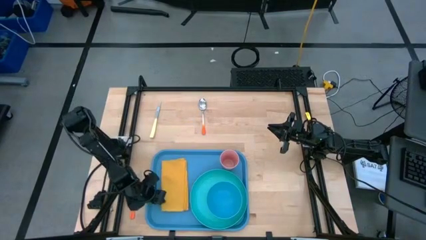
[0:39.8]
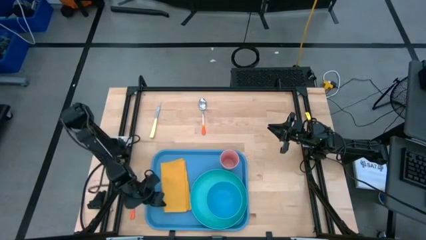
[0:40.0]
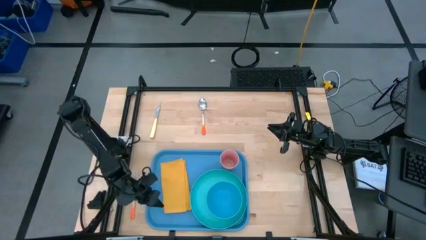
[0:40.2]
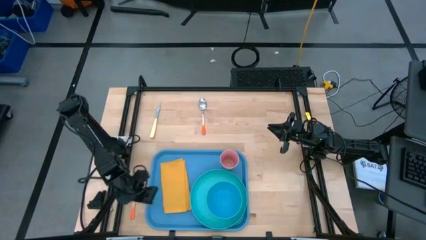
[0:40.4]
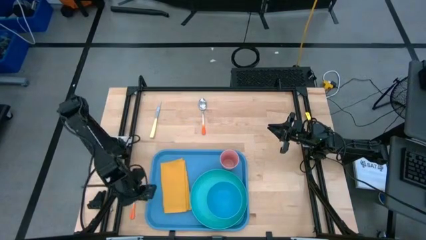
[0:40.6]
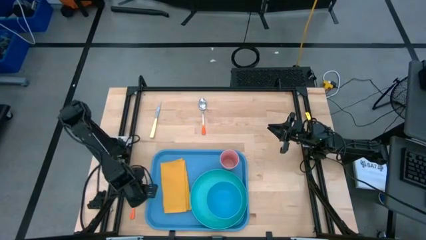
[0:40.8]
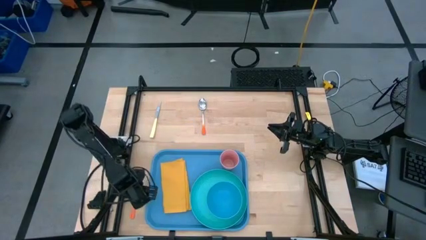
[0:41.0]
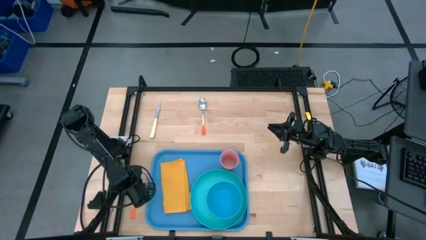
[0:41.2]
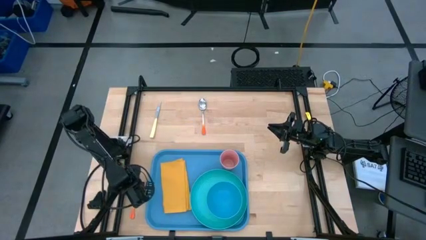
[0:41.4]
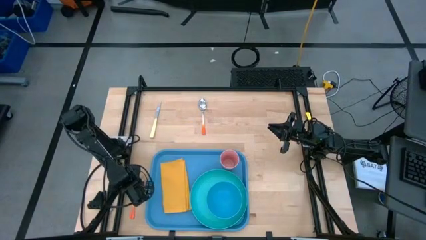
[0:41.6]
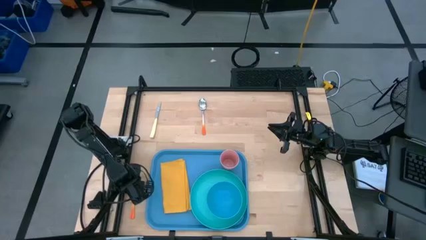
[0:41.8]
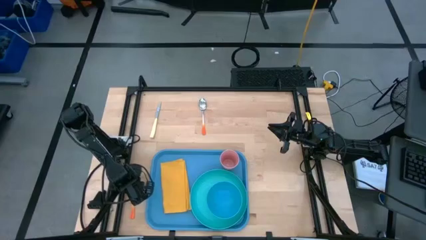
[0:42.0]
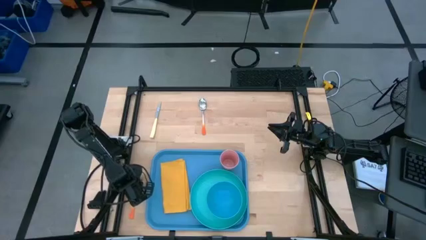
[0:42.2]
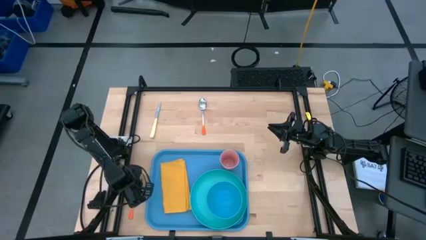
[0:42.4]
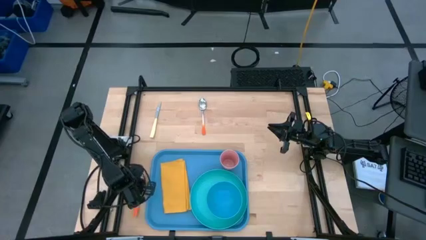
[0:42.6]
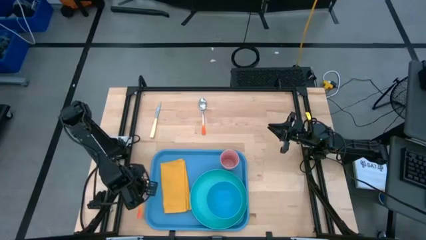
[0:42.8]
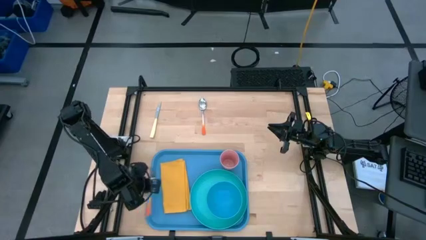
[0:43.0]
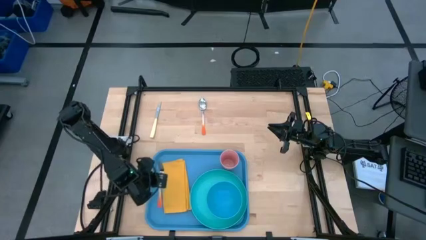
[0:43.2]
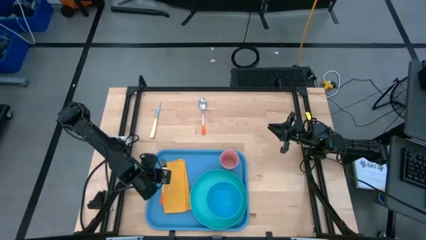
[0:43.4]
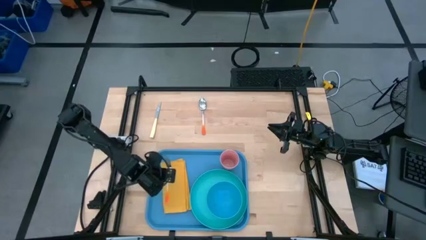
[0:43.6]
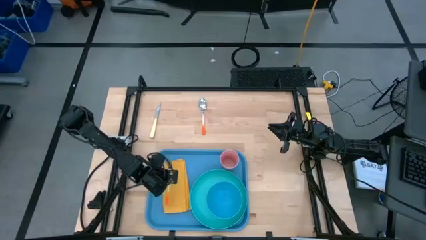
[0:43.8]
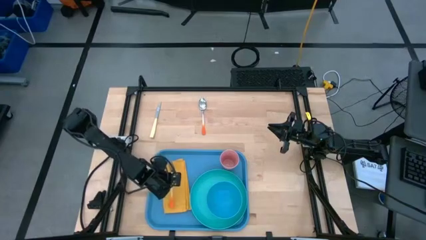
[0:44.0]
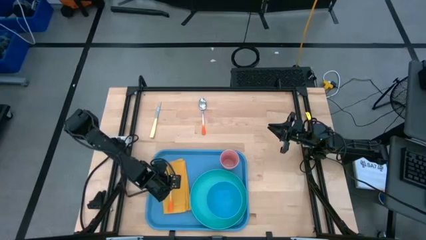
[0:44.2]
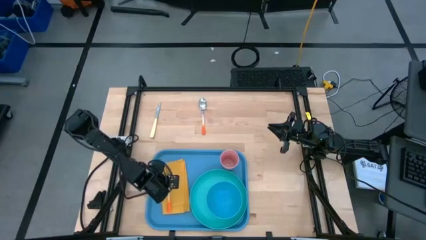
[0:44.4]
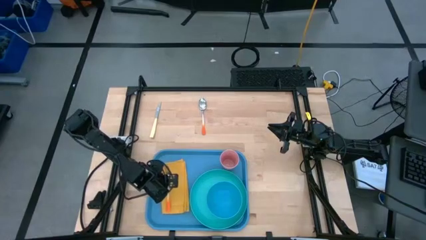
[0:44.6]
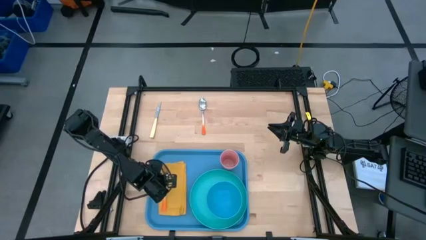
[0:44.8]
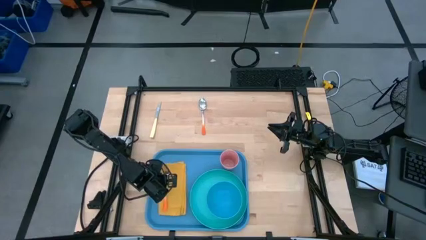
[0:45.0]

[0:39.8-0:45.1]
Task: Set up tray
Put the orange fork on the yellow napkin

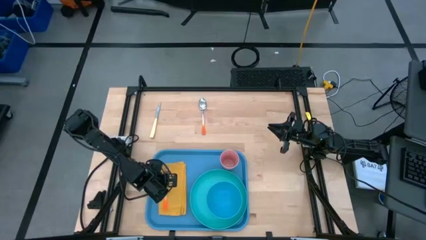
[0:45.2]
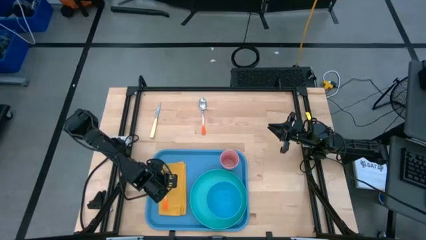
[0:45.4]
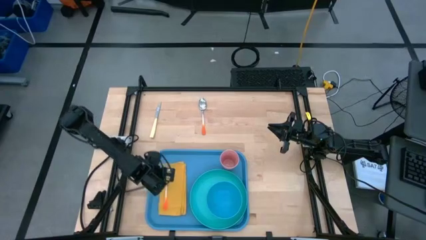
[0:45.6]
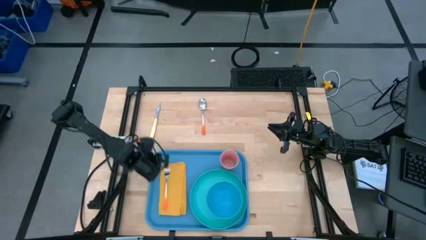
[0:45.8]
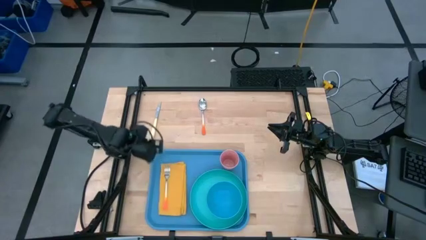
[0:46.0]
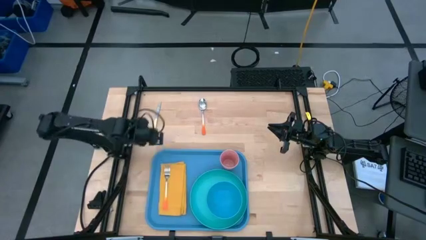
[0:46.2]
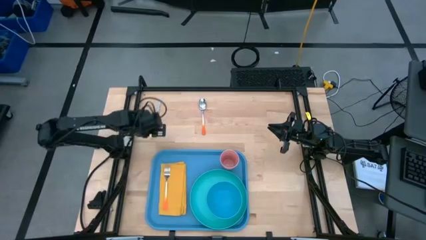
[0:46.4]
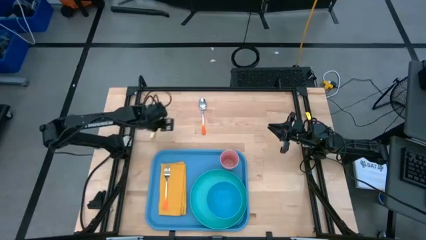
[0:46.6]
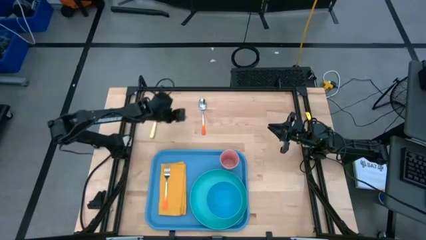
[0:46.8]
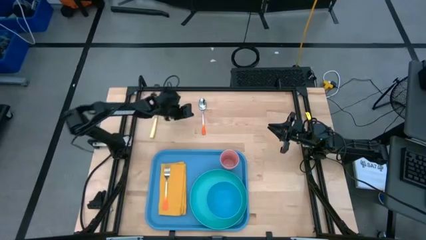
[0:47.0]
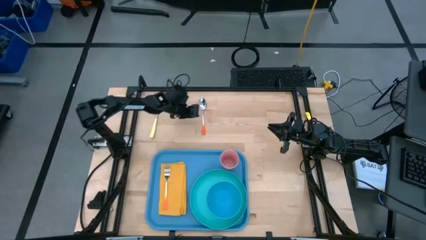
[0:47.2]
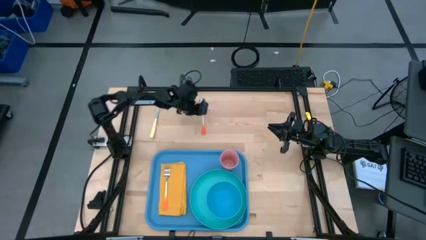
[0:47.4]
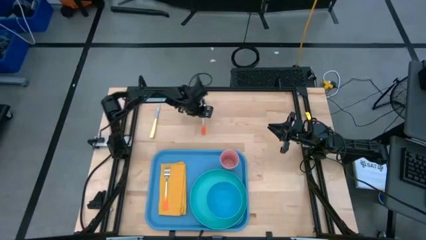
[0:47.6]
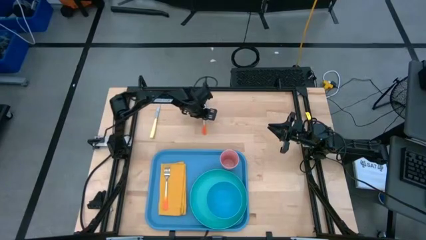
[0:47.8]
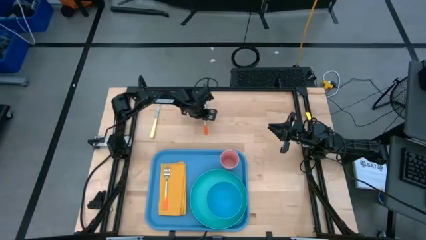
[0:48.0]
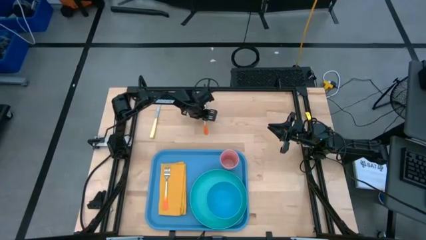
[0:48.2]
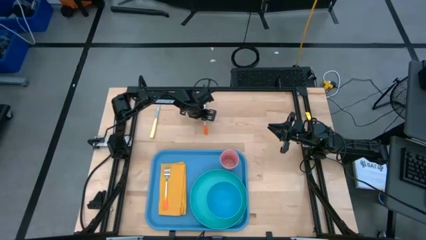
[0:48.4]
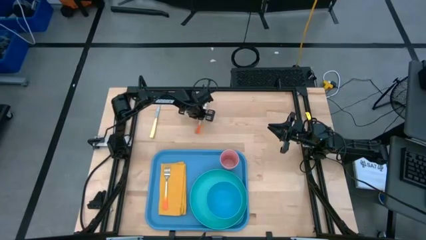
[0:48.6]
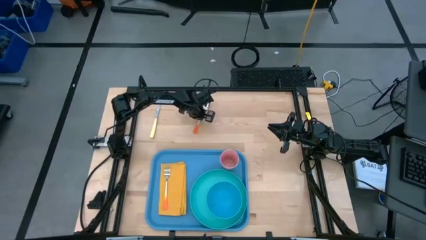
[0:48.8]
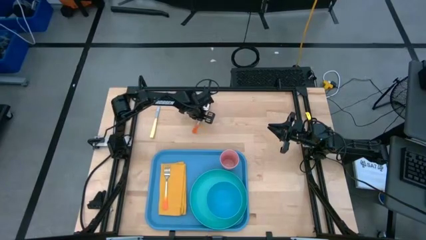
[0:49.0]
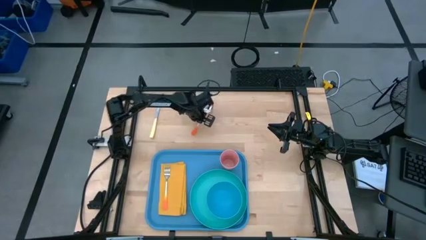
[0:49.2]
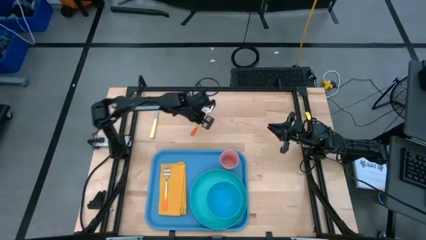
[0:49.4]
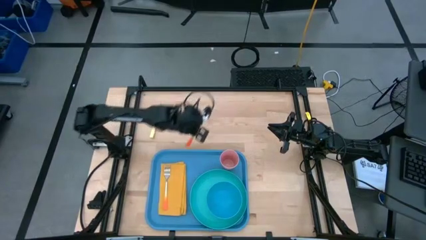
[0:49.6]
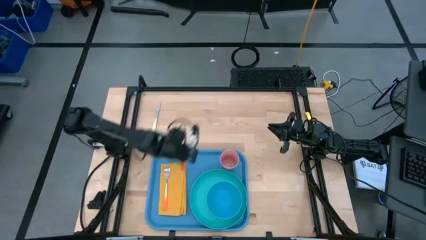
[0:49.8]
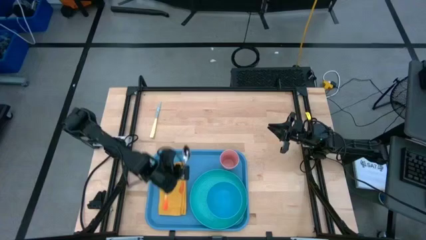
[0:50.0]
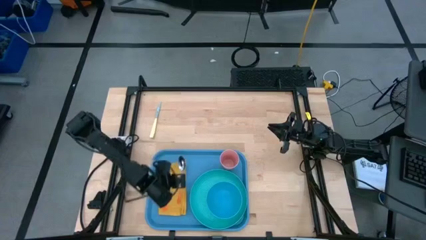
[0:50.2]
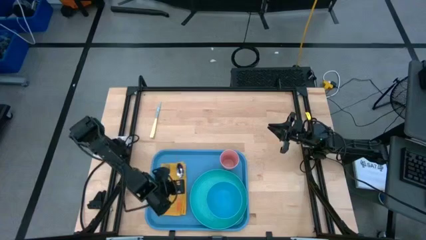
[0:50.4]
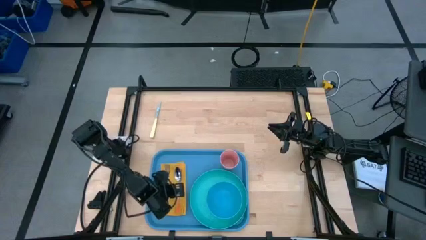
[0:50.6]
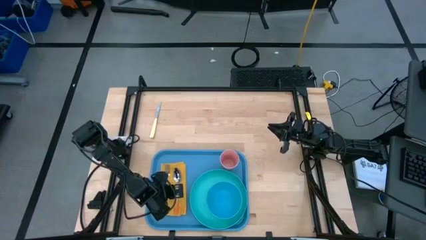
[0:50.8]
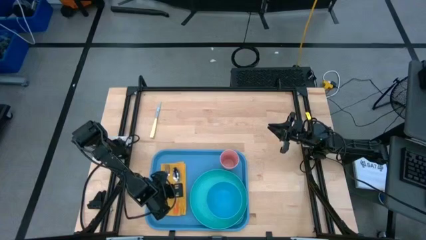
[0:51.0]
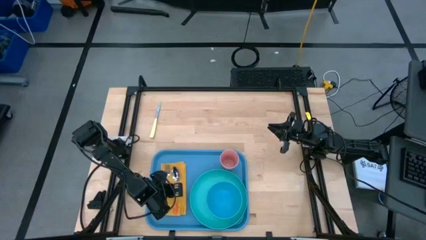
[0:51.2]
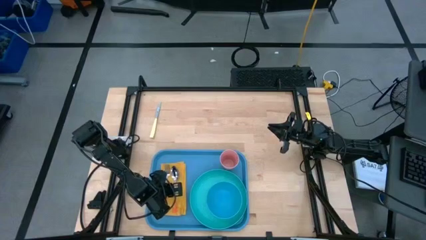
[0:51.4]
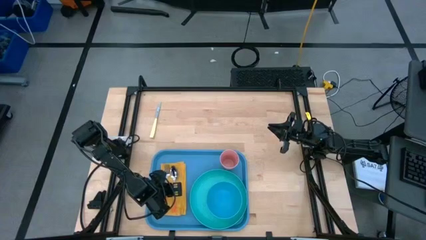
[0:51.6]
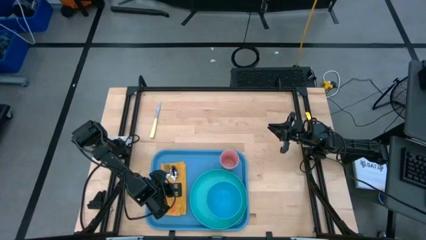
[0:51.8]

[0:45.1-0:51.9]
Put the orange spoon to the right of the orange fork on the yellow napkin

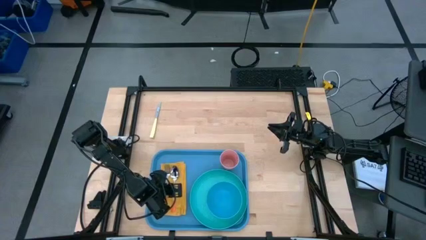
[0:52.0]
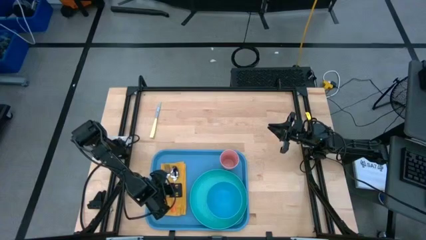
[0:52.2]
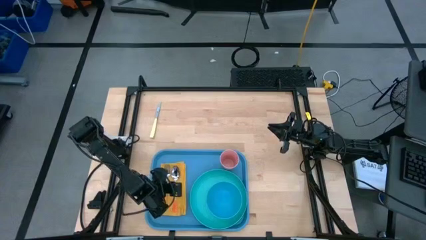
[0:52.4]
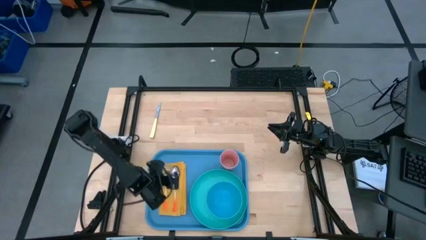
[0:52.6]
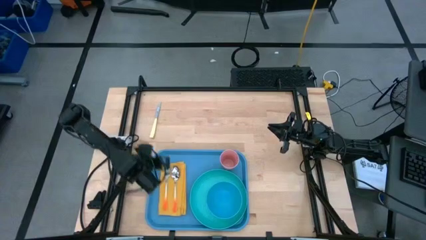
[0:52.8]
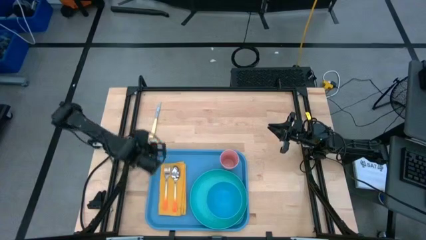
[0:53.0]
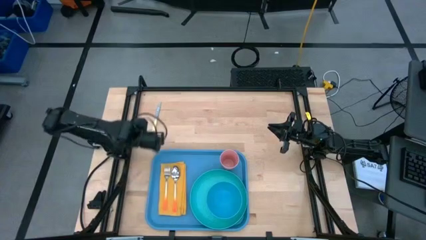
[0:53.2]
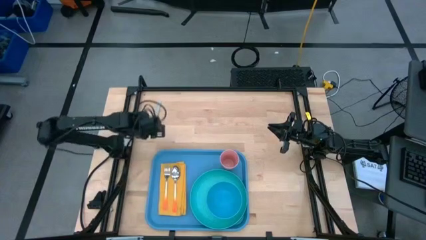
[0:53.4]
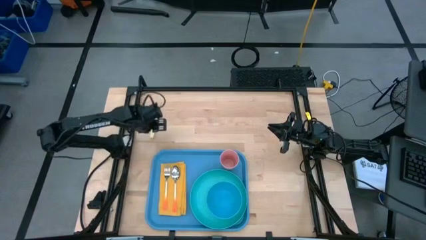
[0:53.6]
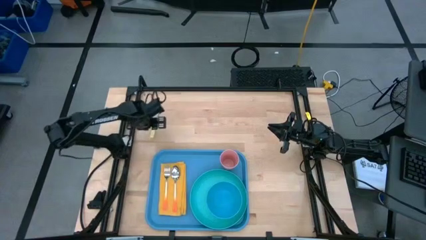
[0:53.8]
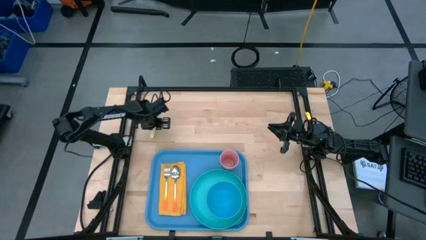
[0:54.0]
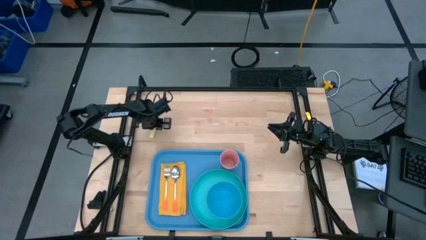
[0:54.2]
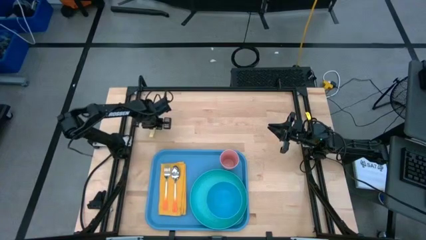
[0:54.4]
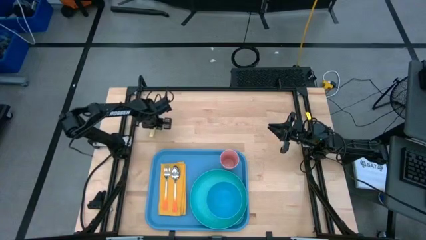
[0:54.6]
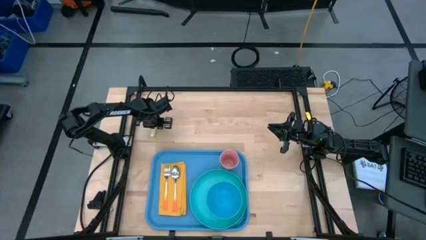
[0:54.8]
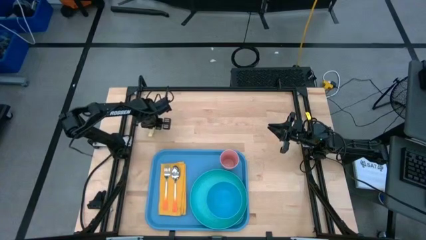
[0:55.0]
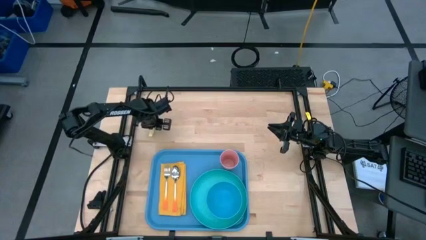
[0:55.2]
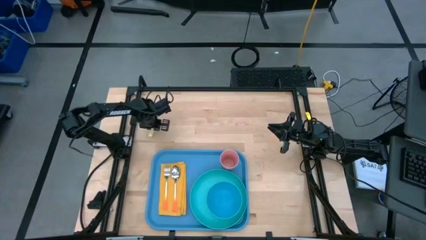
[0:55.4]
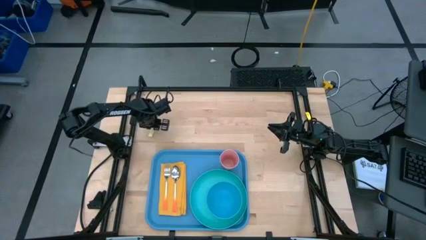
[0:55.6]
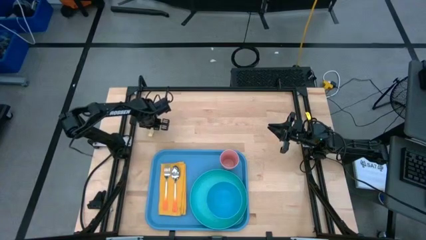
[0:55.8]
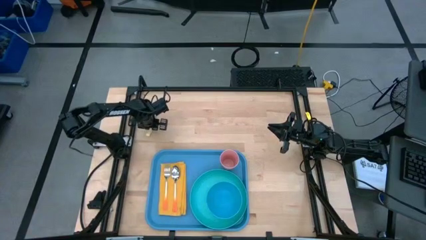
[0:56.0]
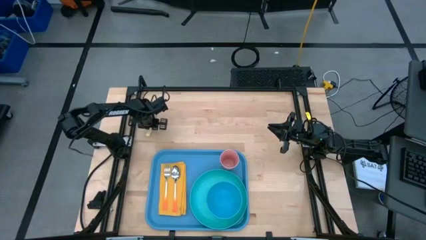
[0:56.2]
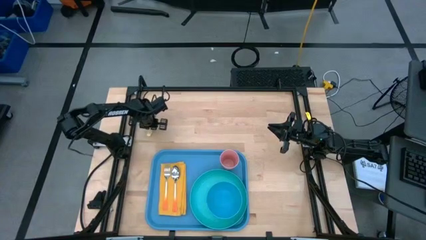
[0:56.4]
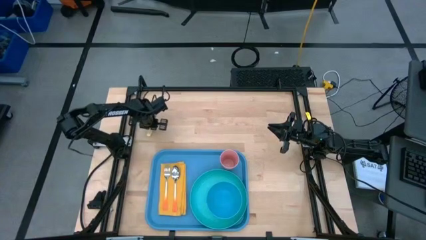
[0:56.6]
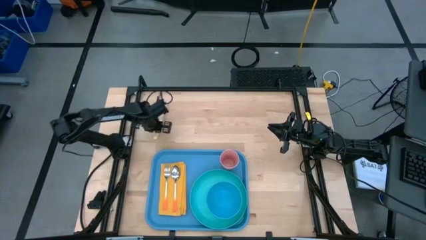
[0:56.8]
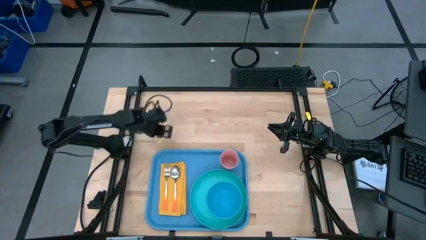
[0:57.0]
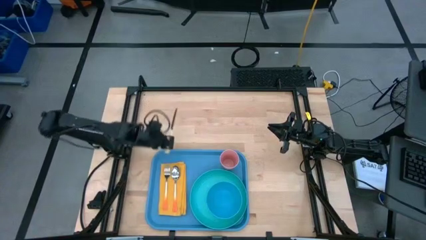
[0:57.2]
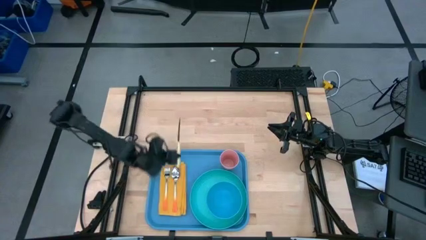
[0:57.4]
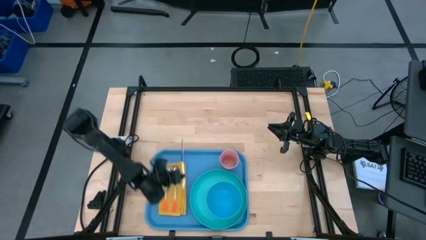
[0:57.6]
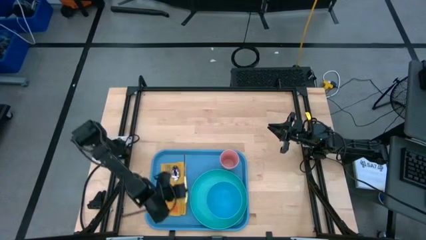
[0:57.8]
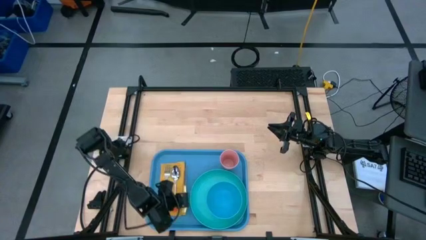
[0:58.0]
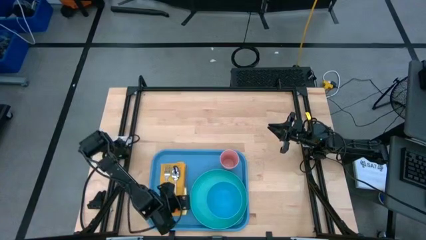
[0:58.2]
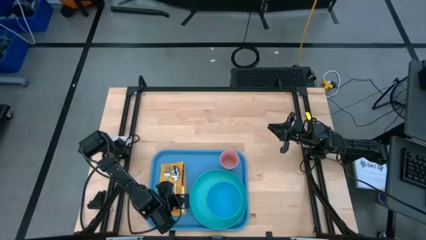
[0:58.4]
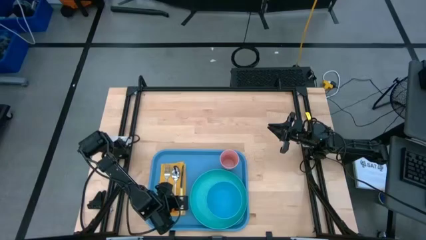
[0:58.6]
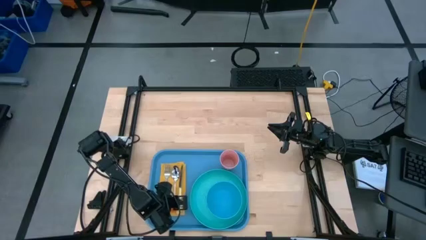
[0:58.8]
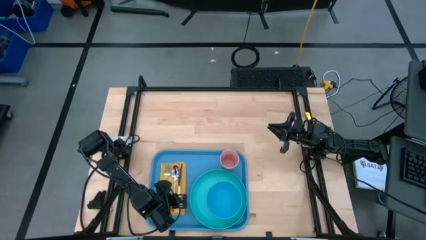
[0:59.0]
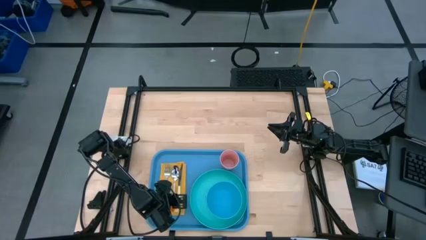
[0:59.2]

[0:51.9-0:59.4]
Put the brown knife to the right of the orange spoon on the yellow napkin
